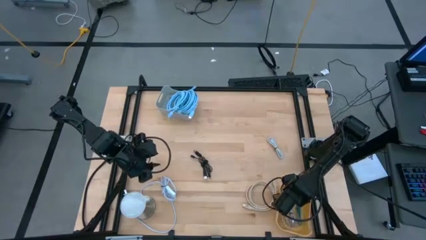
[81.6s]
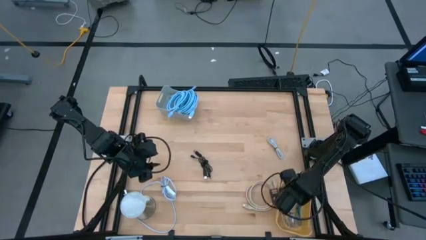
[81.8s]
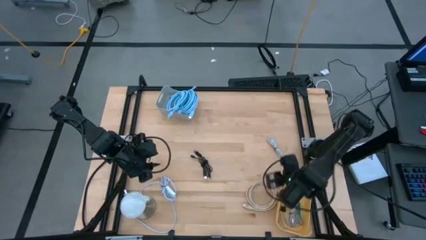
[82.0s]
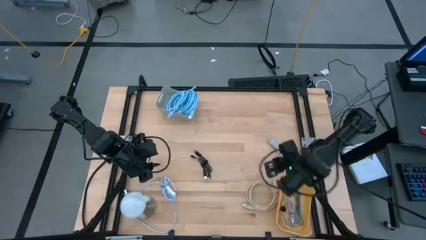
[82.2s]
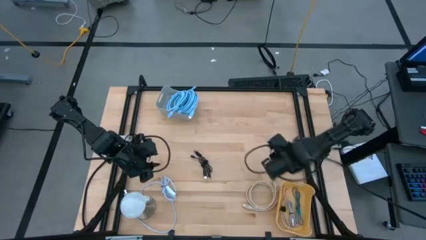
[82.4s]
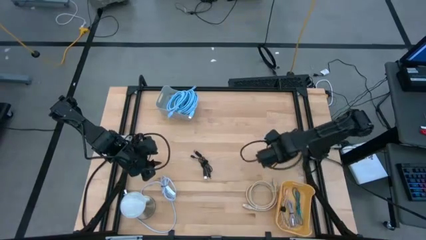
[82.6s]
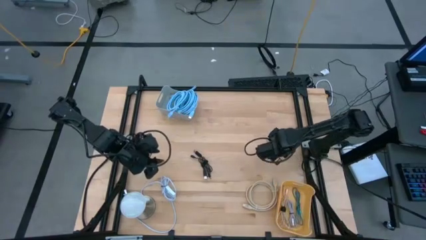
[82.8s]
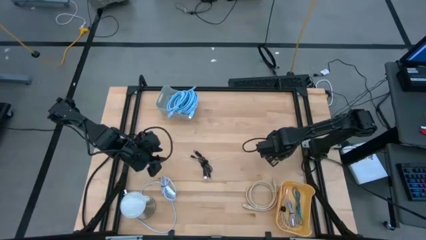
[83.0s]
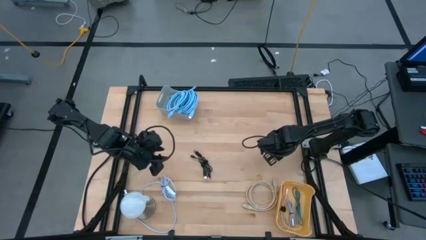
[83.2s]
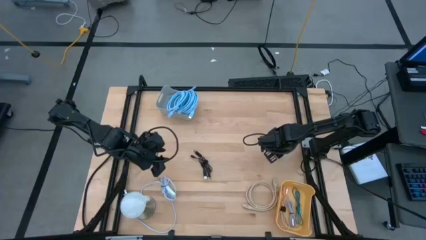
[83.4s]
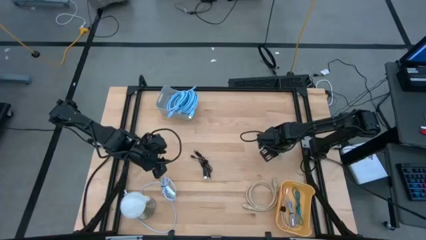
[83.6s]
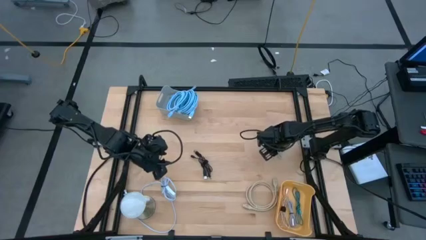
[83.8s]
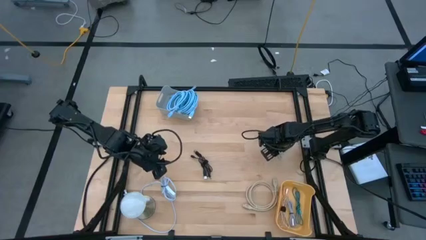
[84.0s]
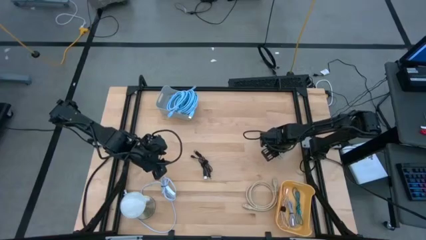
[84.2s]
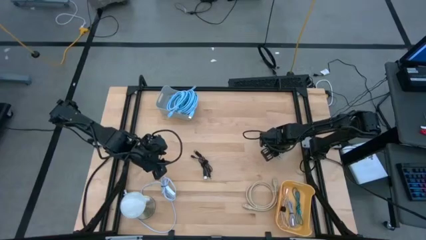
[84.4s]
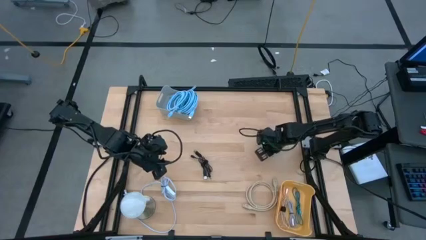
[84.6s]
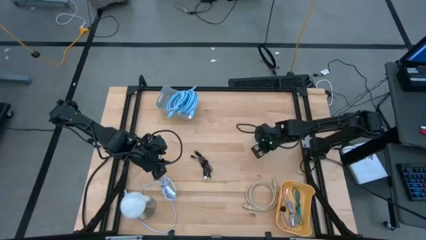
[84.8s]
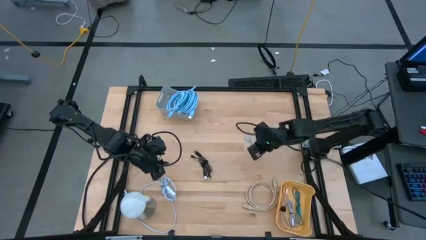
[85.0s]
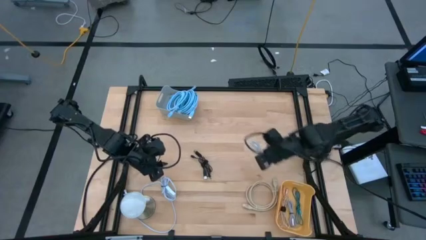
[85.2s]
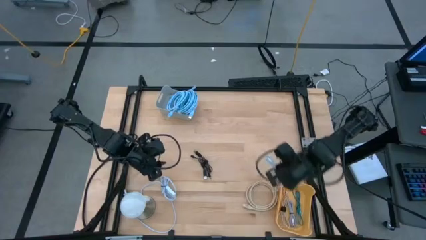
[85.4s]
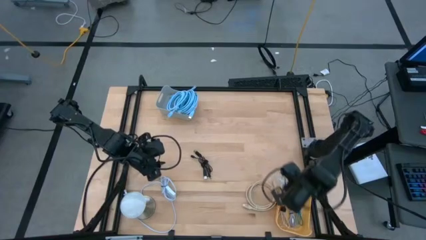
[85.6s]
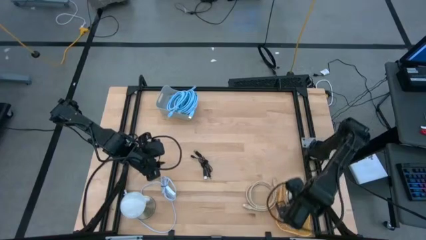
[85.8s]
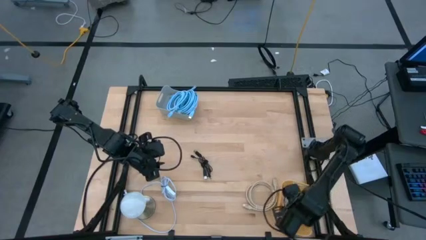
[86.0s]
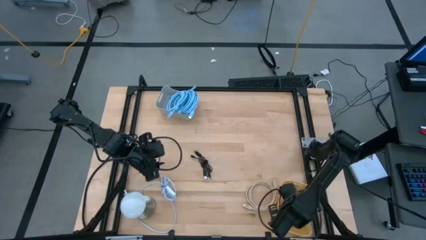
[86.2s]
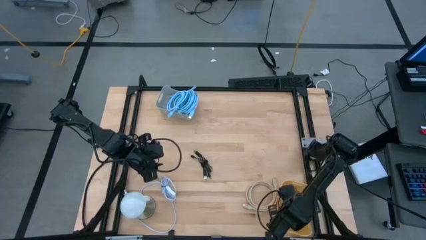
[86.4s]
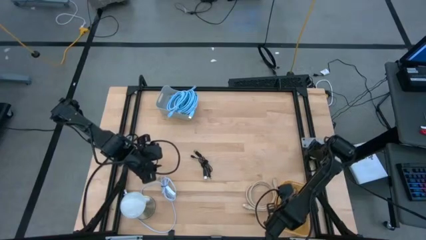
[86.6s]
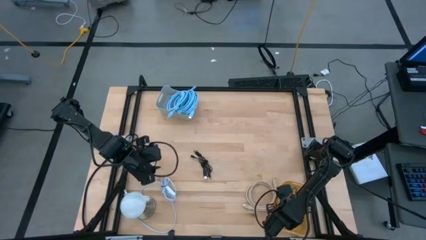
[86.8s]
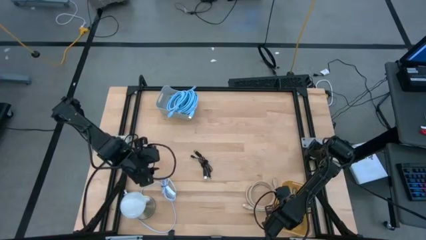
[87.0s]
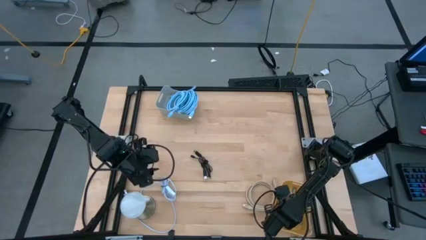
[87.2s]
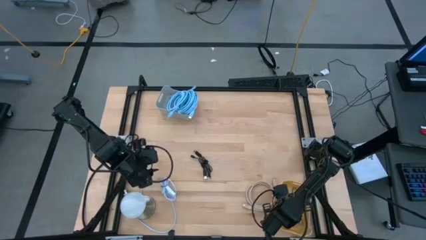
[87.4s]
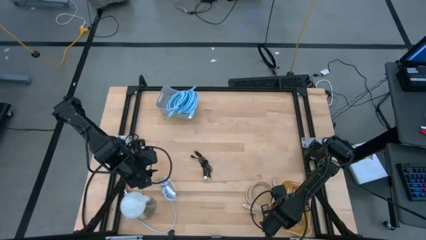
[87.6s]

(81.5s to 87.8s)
Task: Pick & Place USB Port
Put the white charger cable into the yellow bin

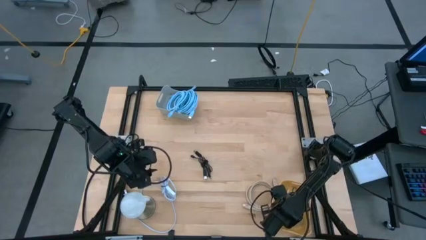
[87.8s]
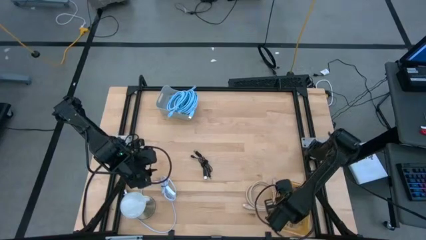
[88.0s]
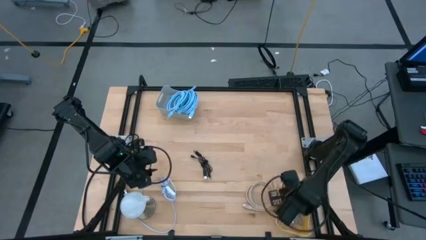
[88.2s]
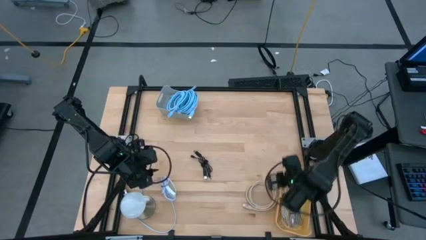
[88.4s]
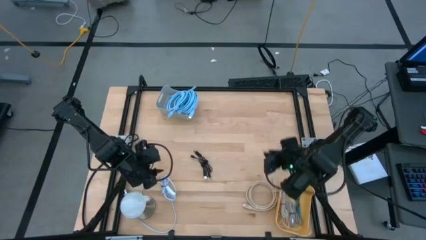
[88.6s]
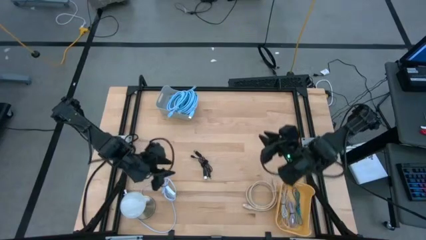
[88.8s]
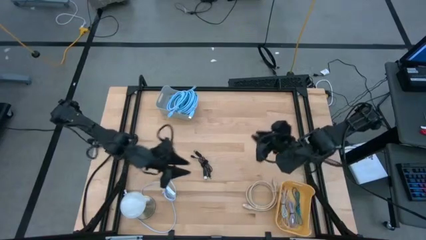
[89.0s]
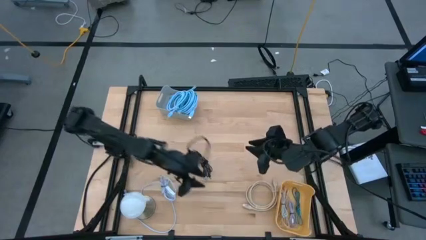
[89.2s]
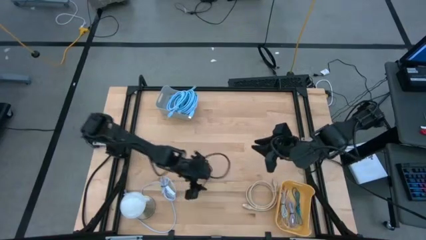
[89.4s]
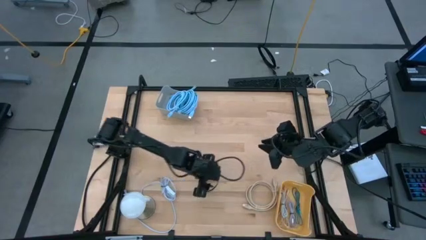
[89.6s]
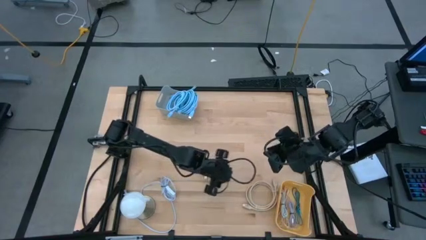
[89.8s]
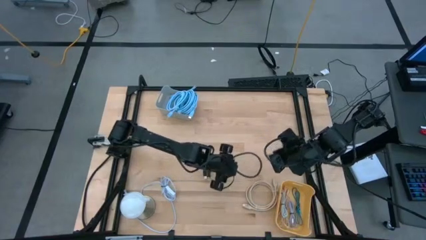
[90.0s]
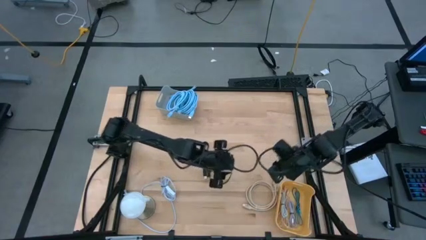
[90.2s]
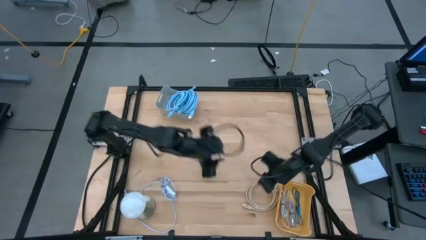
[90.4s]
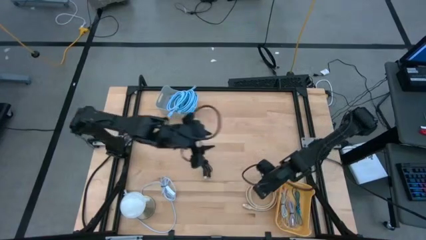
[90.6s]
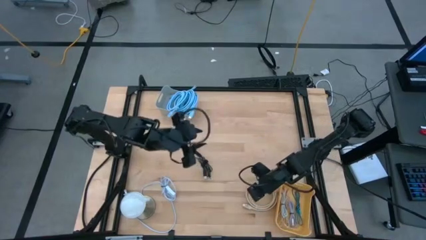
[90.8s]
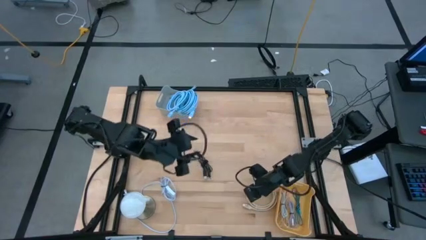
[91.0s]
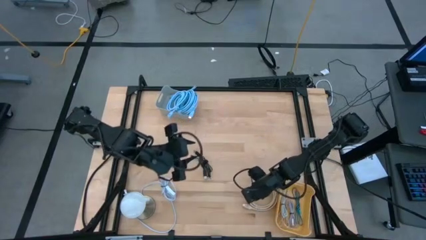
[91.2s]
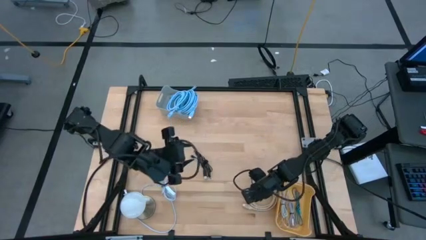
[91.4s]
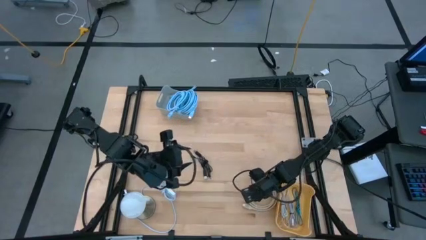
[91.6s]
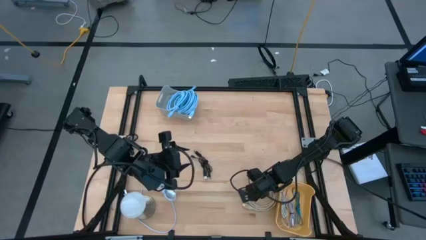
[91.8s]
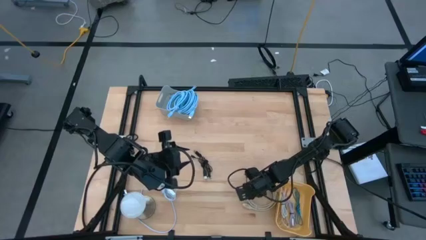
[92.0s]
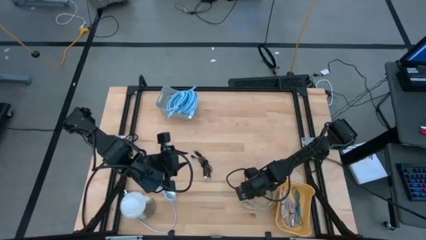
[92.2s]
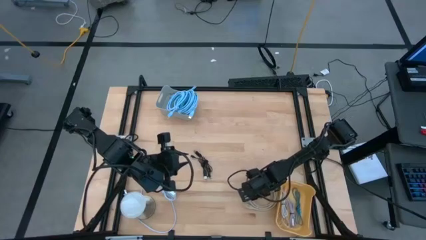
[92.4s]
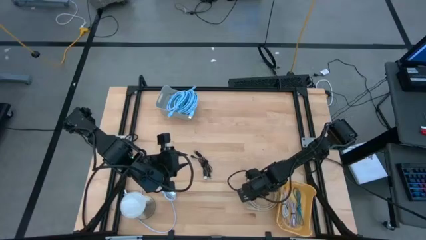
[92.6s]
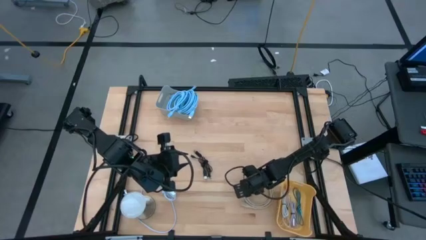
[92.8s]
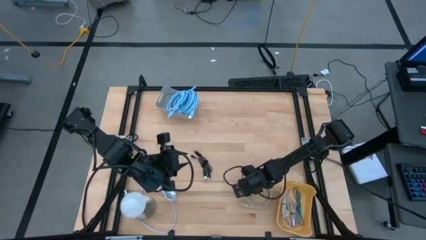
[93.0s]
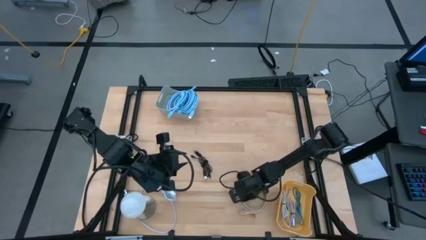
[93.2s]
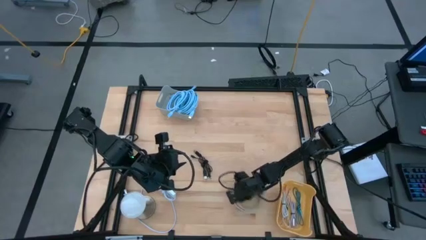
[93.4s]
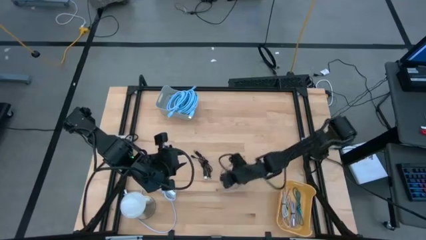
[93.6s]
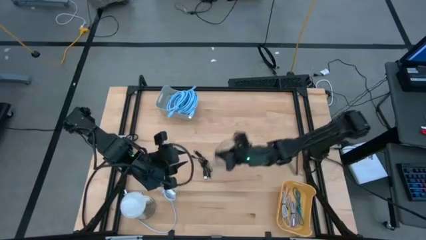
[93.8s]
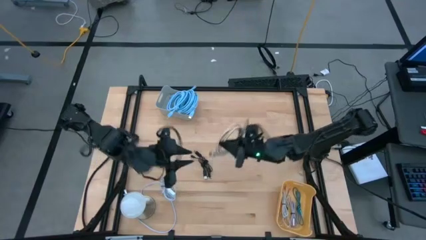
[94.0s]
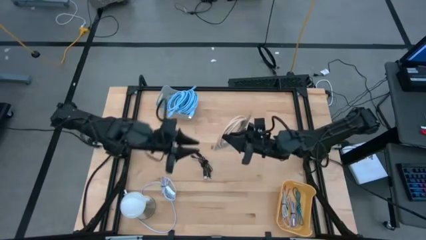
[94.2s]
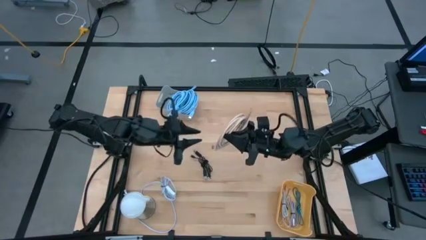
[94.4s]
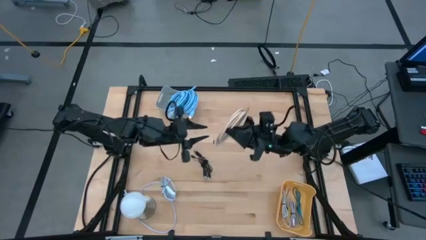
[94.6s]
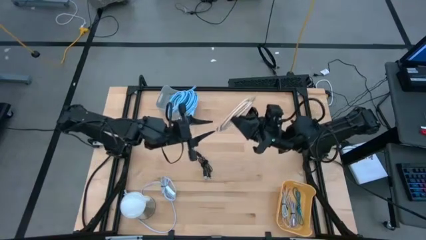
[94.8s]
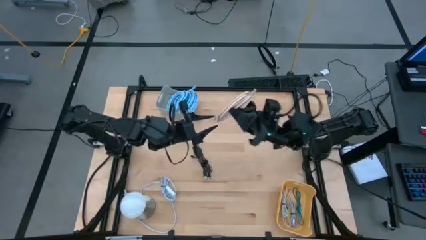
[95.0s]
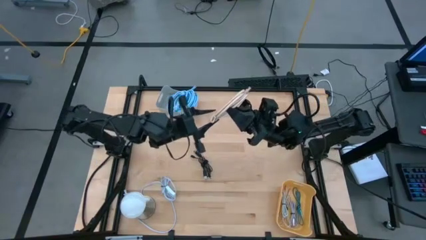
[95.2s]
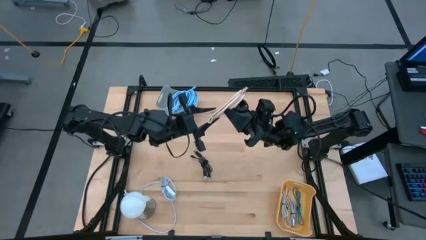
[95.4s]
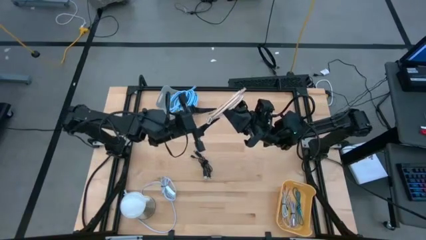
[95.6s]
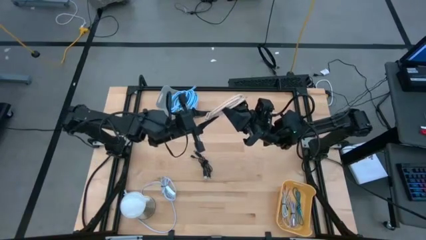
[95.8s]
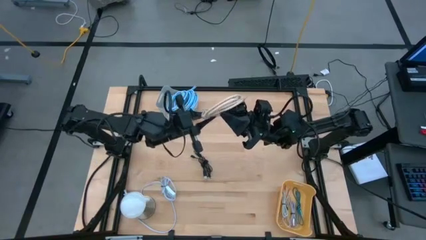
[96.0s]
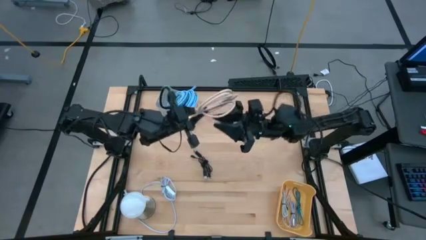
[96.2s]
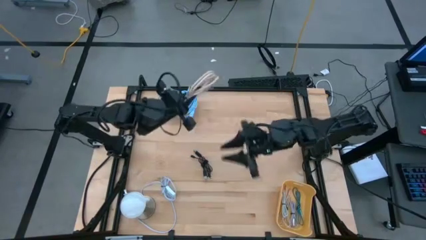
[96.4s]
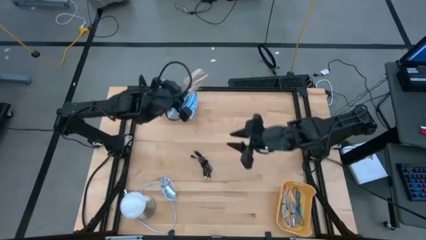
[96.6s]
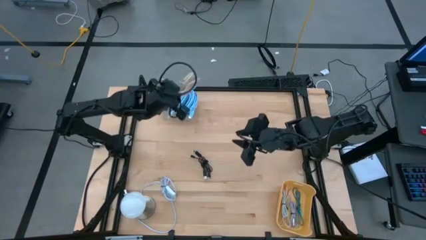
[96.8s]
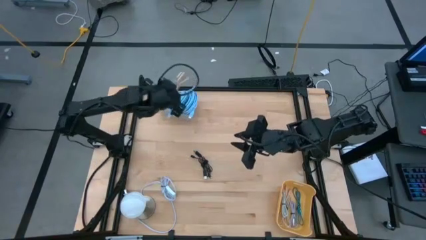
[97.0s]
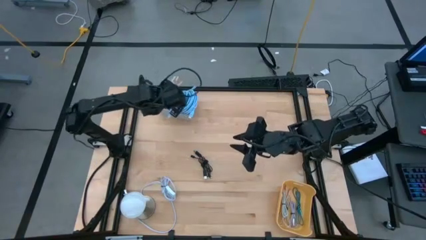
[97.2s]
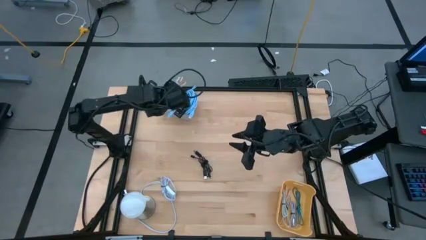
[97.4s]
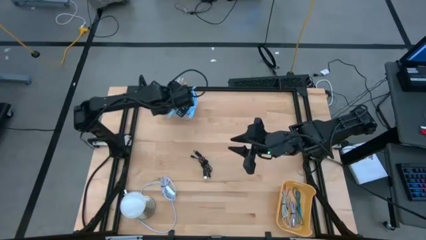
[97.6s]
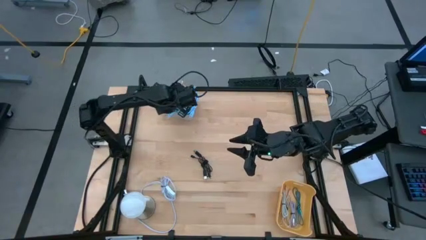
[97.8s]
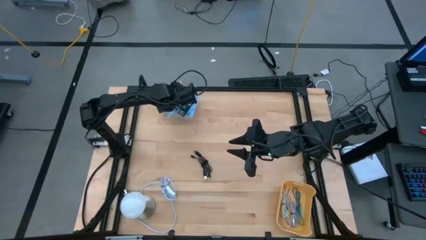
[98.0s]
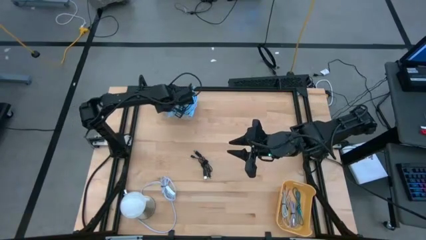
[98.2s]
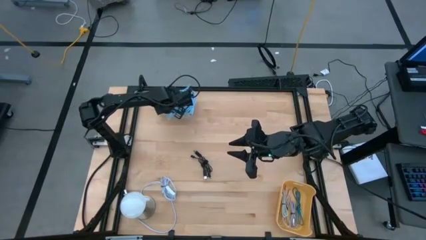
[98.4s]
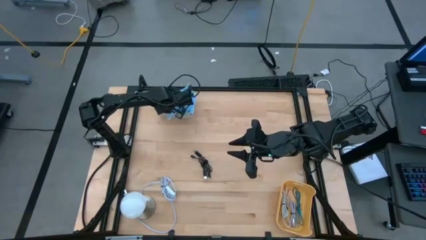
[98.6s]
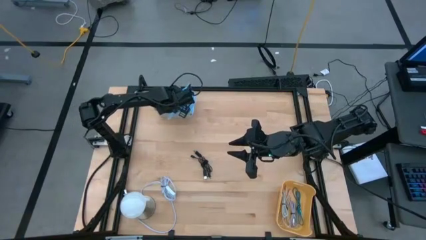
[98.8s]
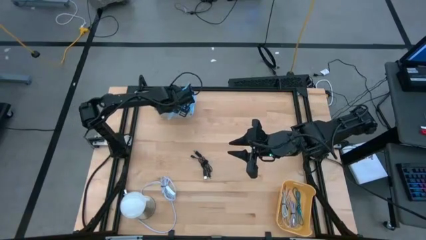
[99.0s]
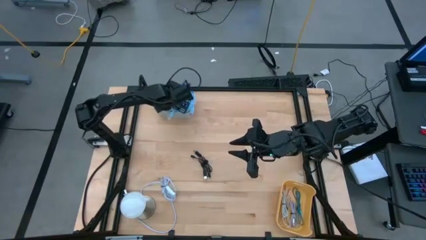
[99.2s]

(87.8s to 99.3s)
Put the brown HDMI cable into the gray bin
